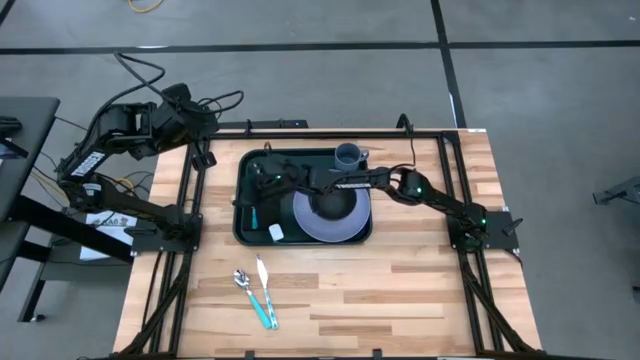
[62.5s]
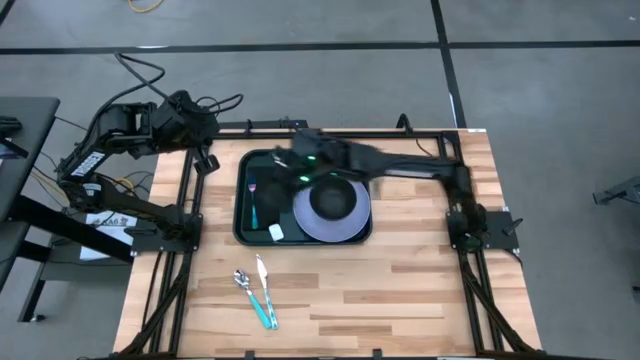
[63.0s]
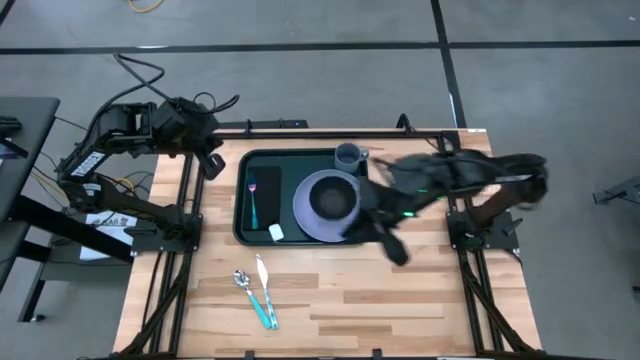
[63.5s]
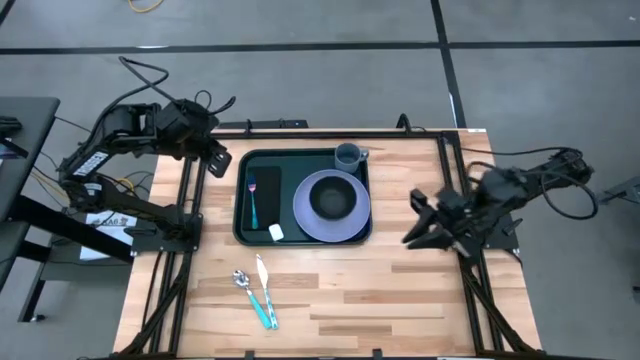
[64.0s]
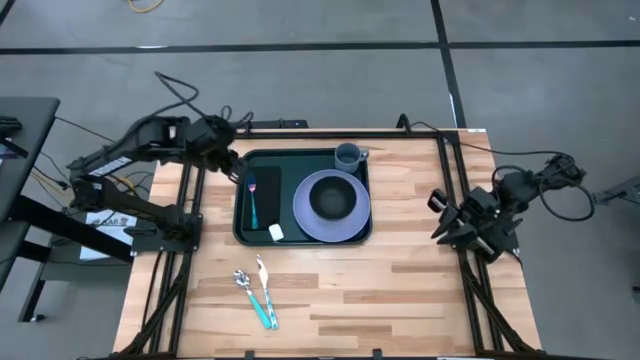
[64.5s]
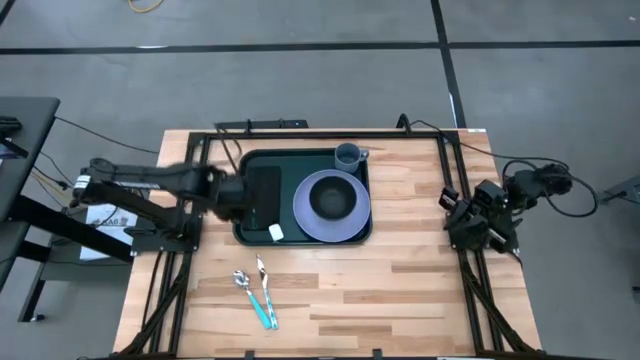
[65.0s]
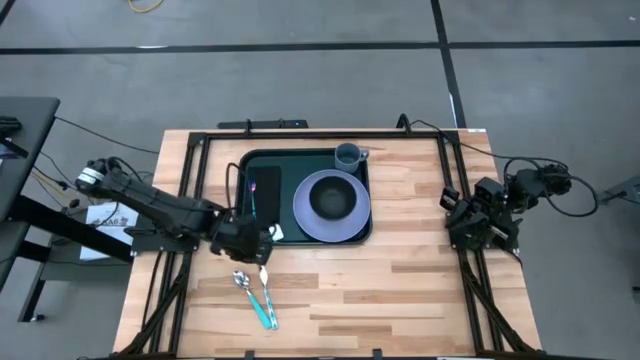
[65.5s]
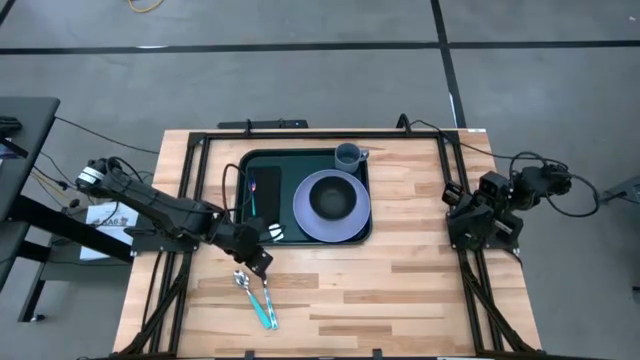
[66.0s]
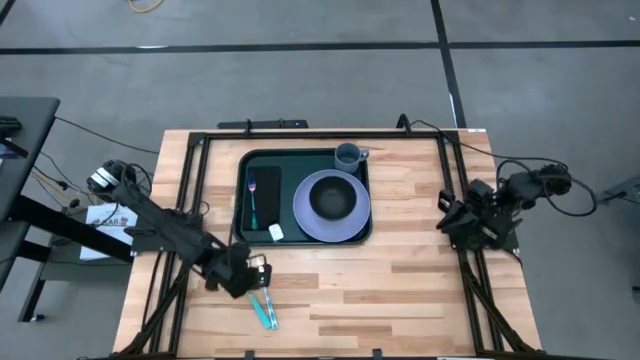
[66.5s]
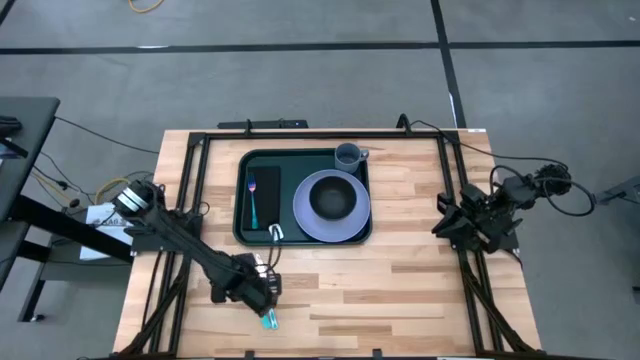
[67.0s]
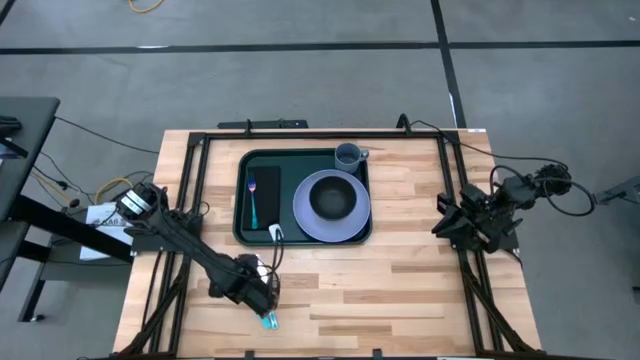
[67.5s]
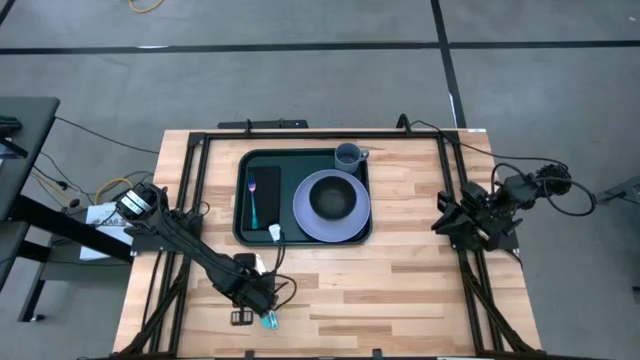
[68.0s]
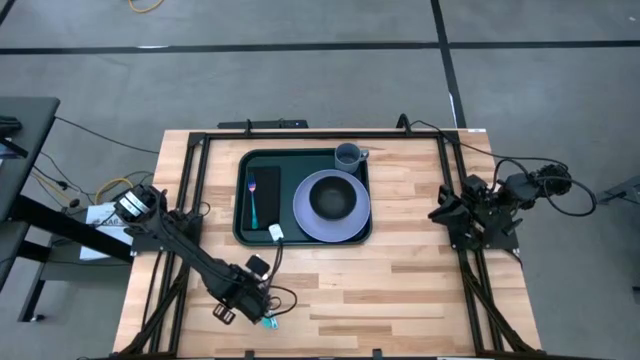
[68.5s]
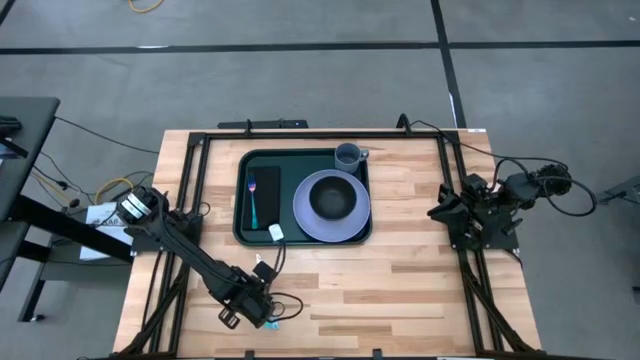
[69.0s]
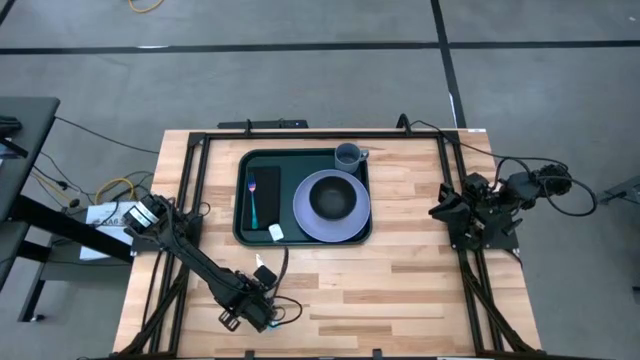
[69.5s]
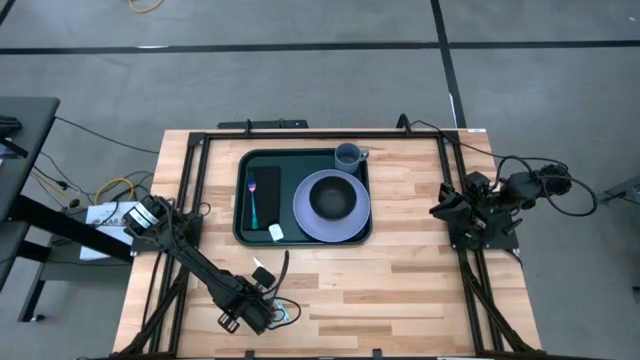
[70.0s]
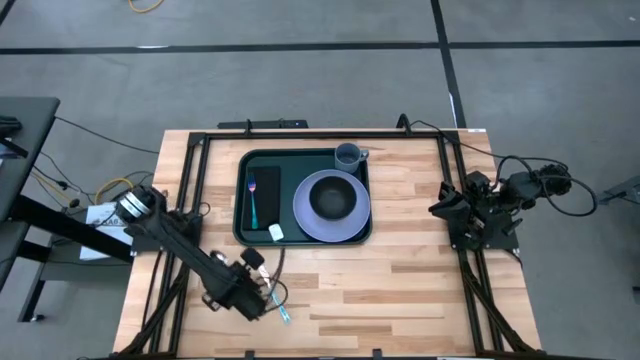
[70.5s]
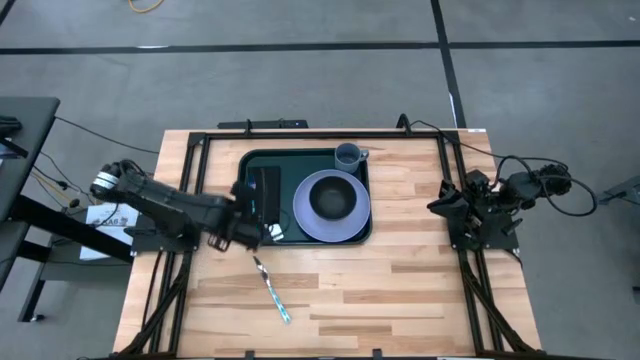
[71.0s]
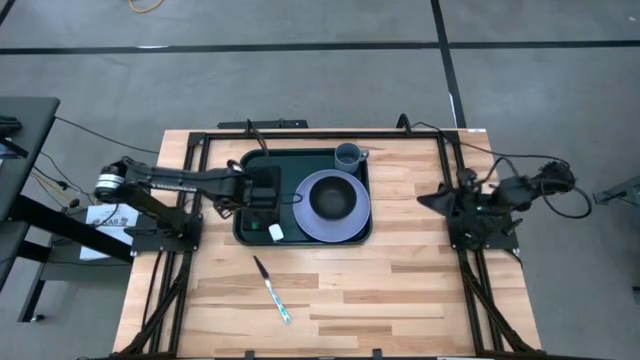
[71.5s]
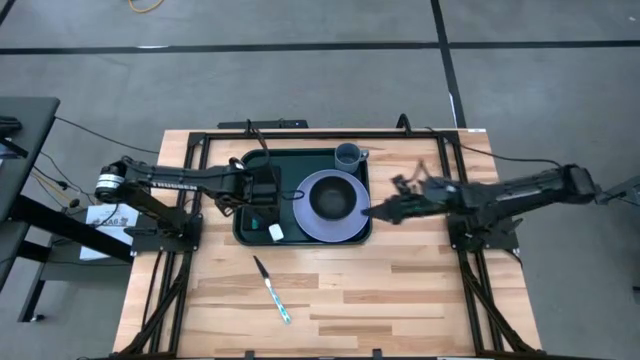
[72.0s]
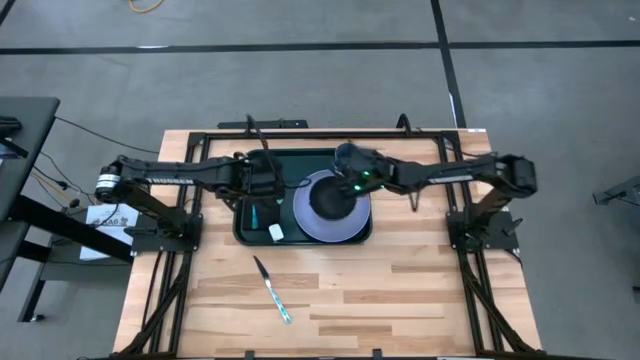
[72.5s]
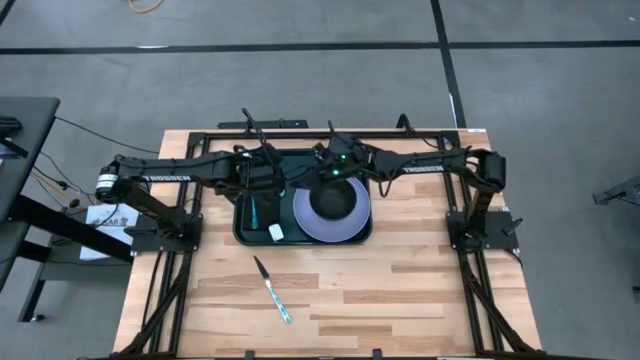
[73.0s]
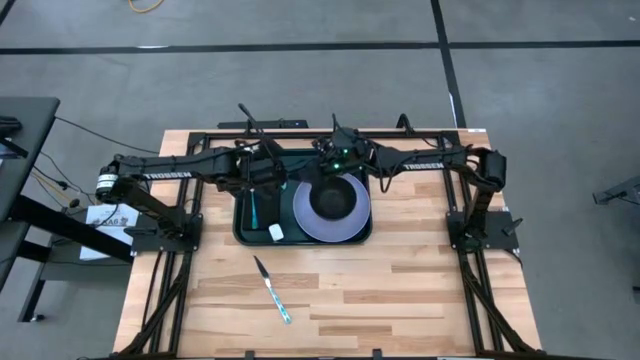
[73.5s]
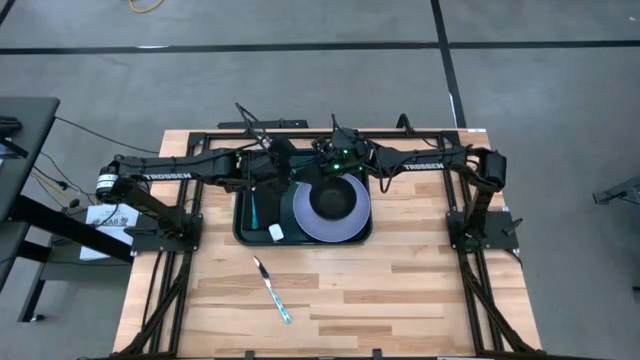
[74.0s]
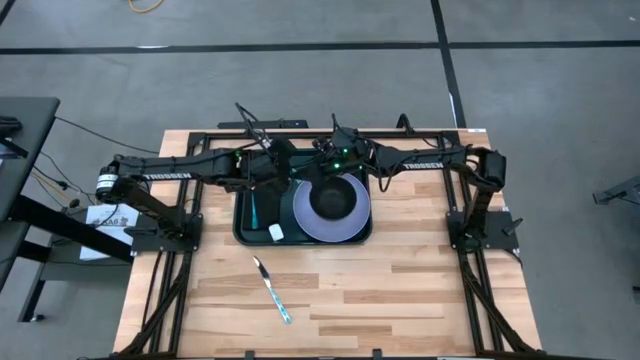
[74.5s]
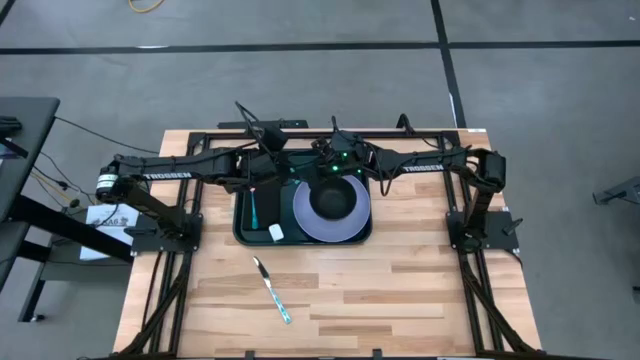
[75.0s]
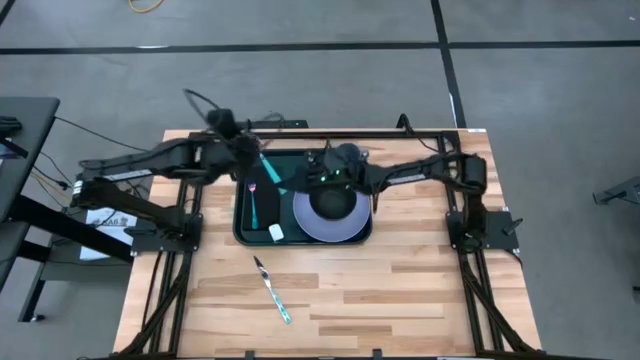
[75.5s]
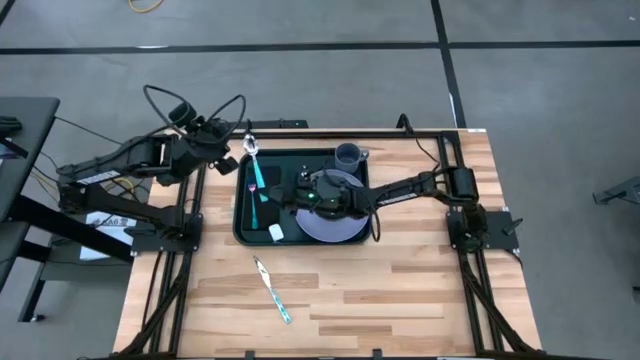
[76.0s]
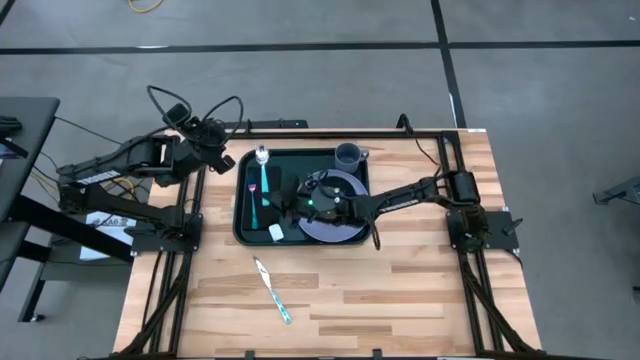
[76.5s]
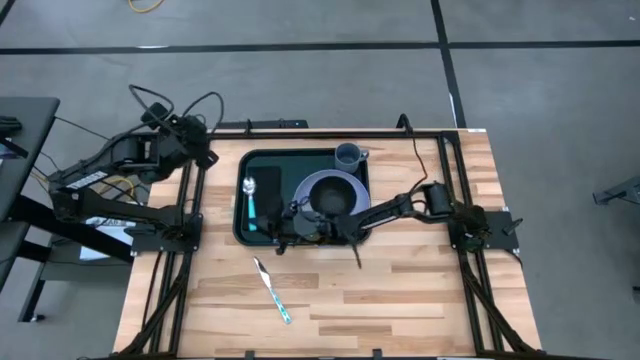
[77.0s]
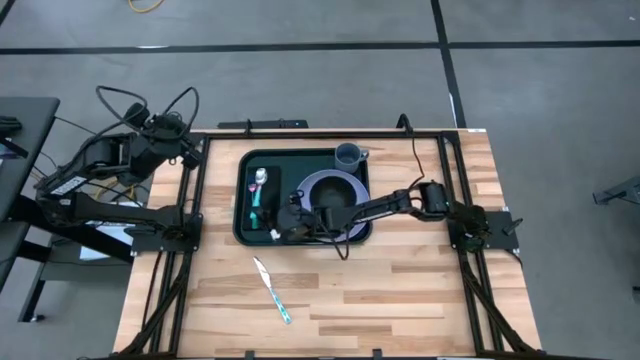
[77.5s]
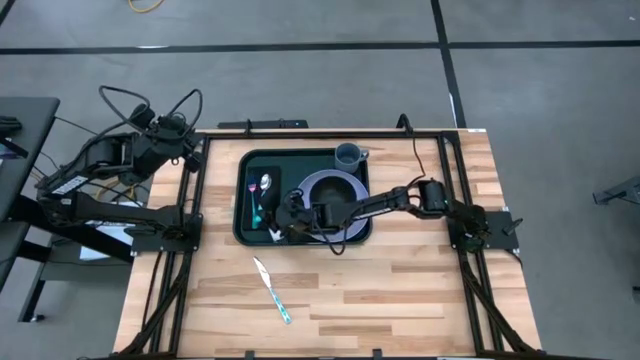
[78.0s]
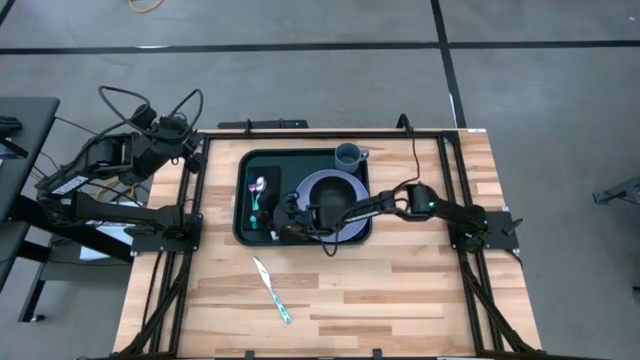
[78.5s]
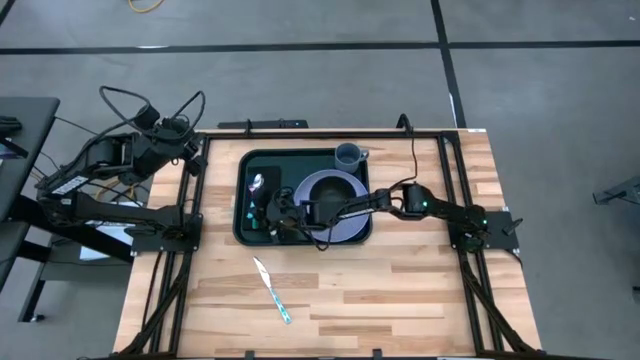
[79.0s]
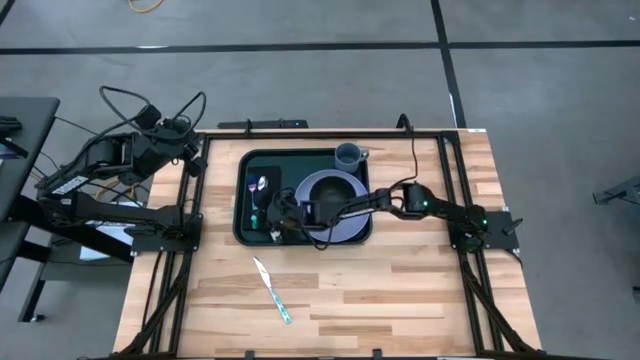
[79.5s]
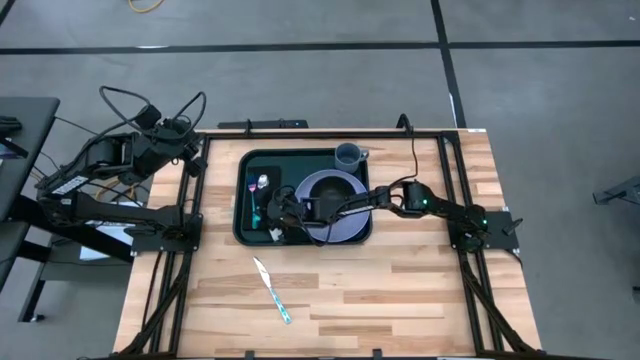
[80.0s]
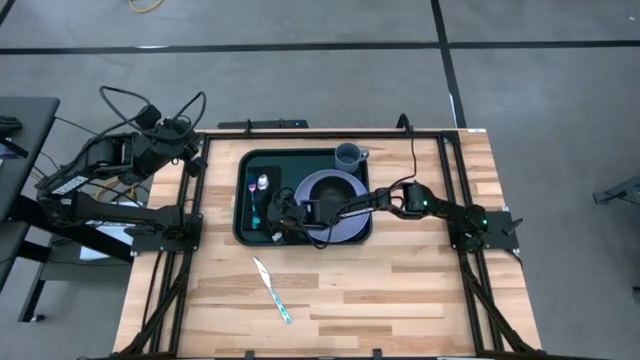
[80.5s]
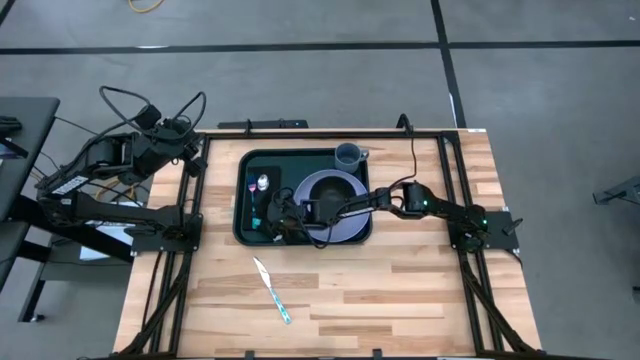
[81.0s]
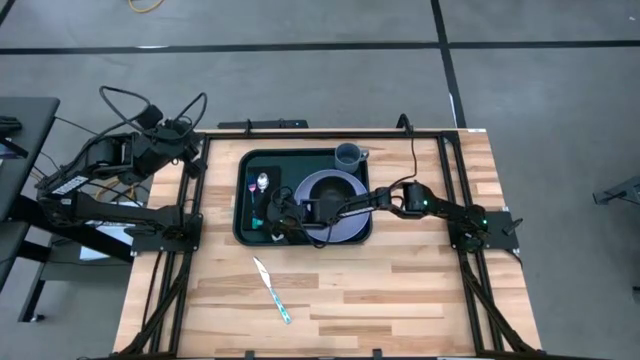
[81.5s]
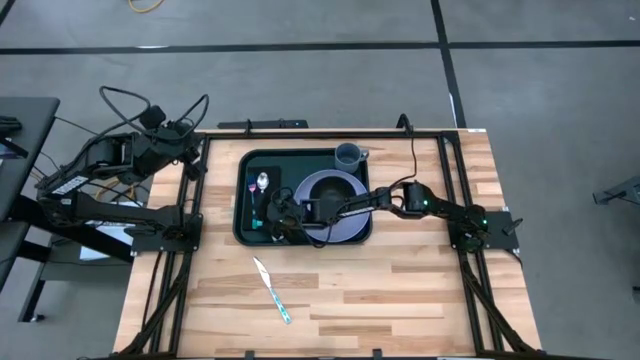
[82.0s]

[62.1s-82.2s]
Task: Set up tray
Put the blue spoon on the black table napkin to the right of the purple fork

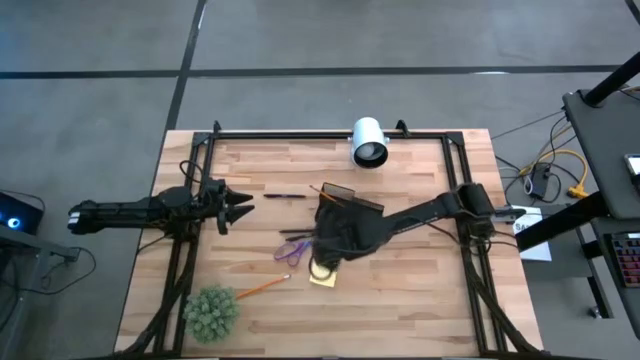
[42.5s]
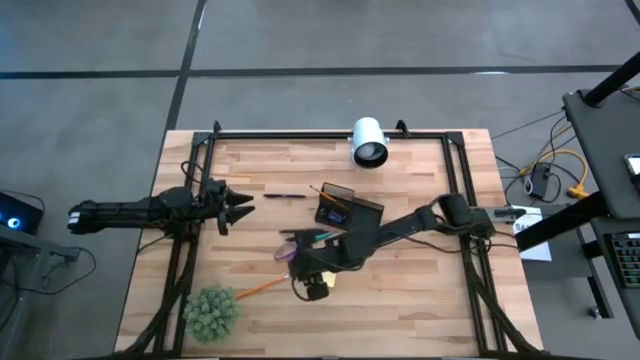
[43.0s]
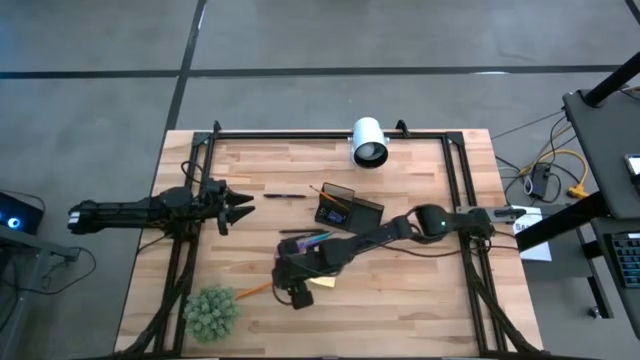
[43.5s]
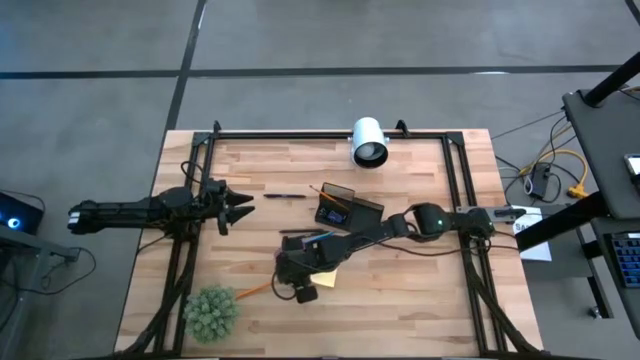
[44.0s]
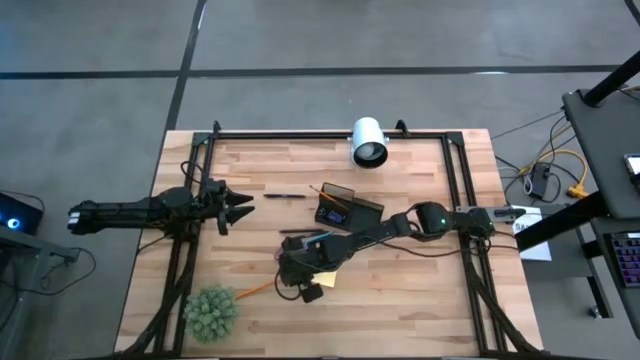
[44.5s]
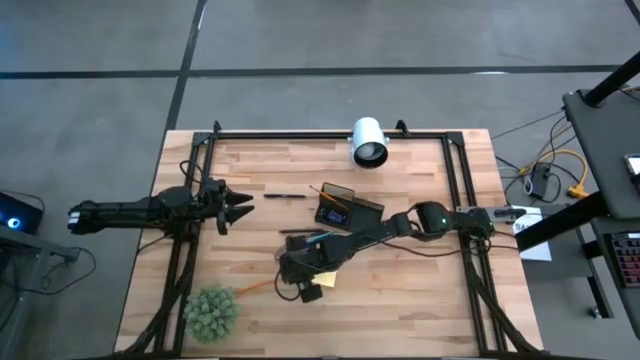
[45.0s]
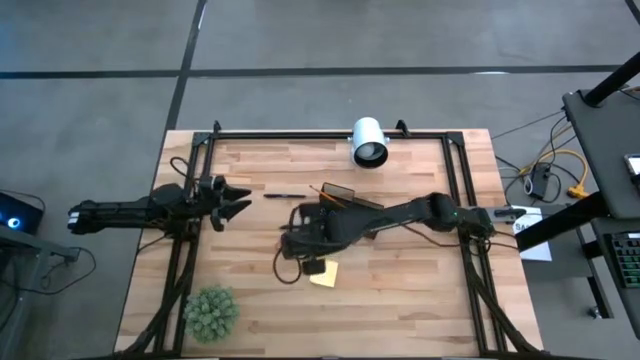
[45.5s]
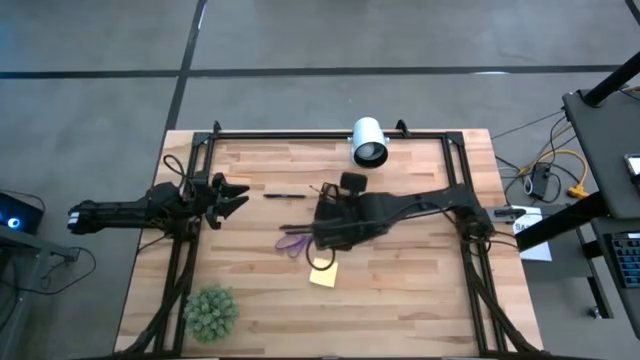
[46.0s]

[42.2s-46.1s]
Task: Pick and place office supplies into organizer
Put the yellow pencil into the black mesh organizer
